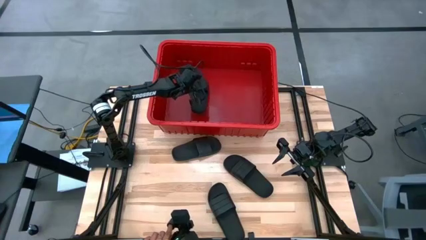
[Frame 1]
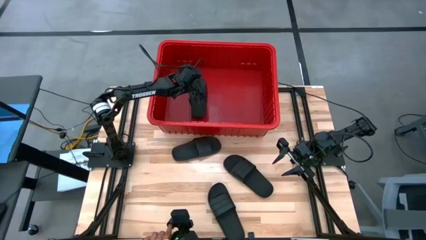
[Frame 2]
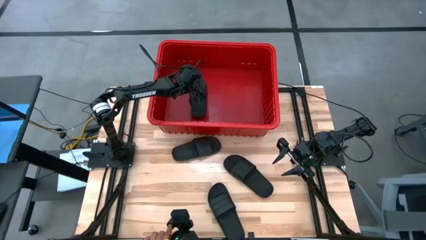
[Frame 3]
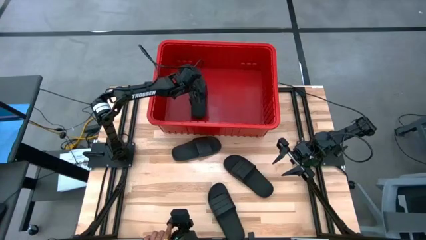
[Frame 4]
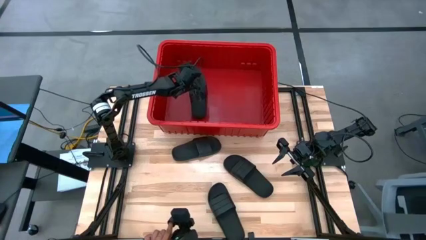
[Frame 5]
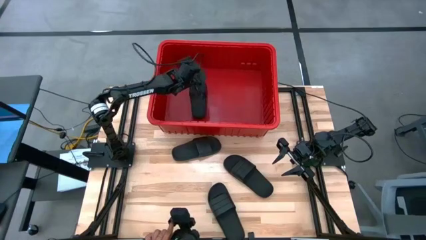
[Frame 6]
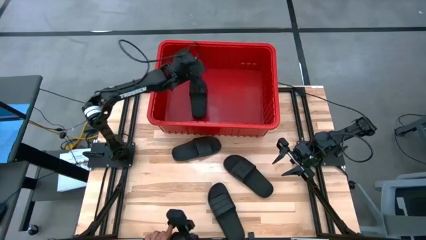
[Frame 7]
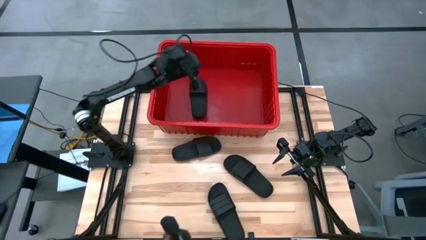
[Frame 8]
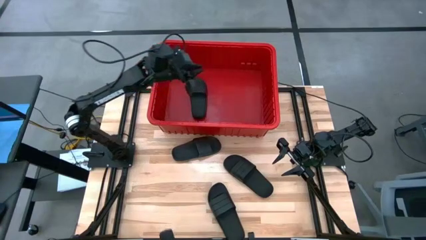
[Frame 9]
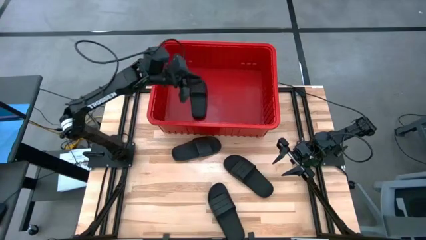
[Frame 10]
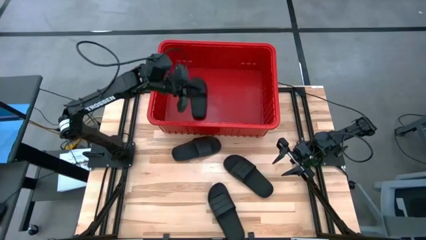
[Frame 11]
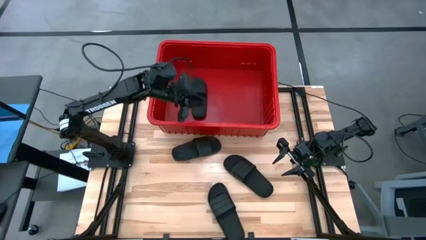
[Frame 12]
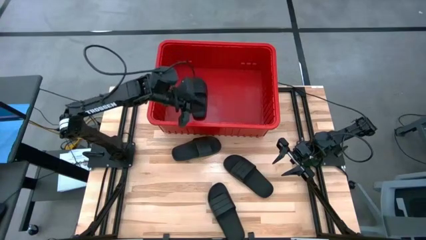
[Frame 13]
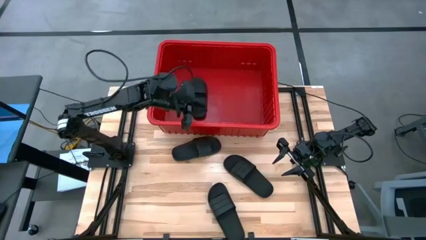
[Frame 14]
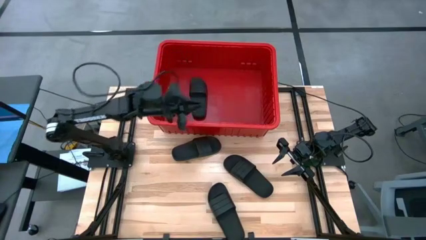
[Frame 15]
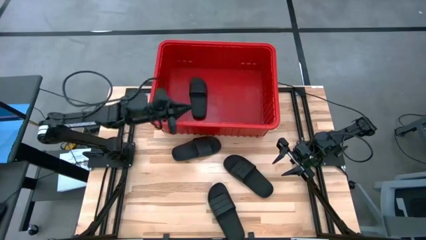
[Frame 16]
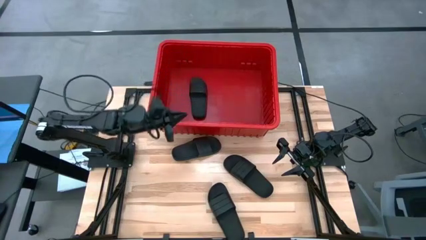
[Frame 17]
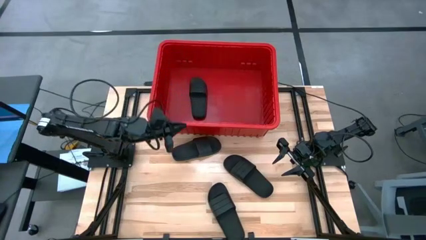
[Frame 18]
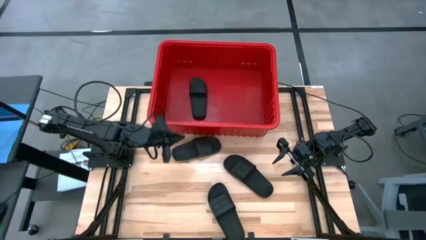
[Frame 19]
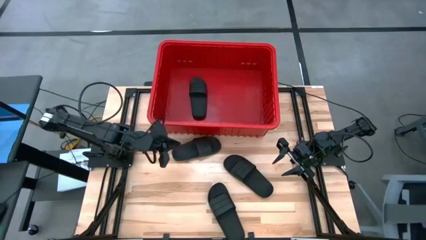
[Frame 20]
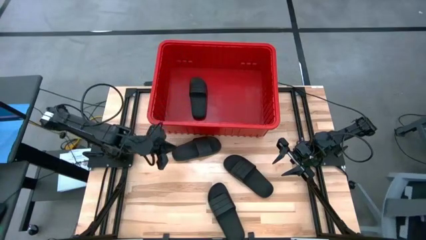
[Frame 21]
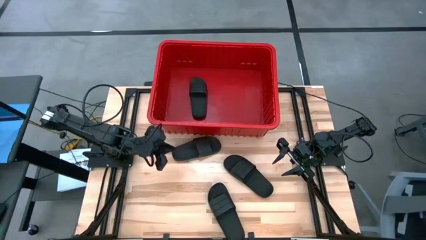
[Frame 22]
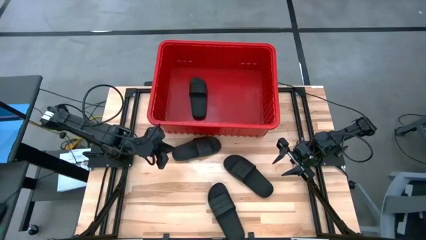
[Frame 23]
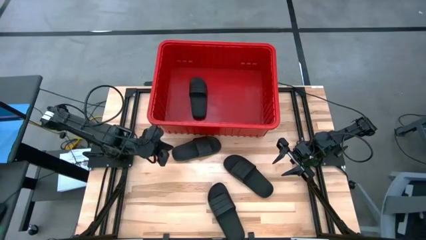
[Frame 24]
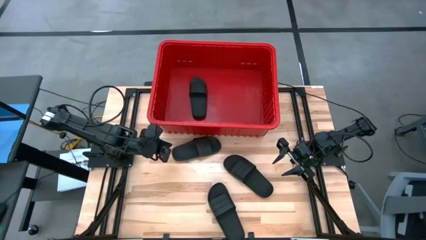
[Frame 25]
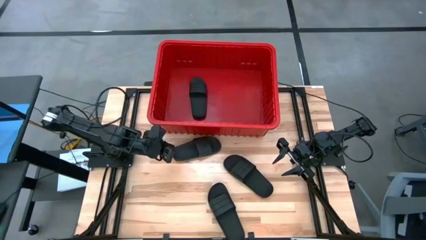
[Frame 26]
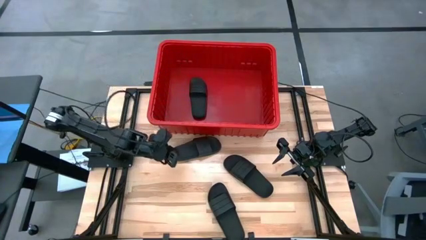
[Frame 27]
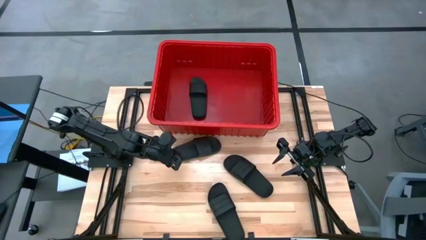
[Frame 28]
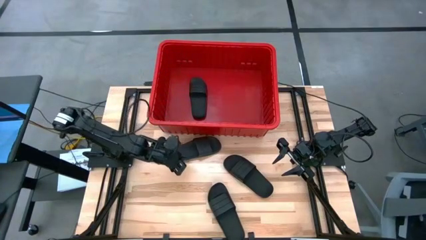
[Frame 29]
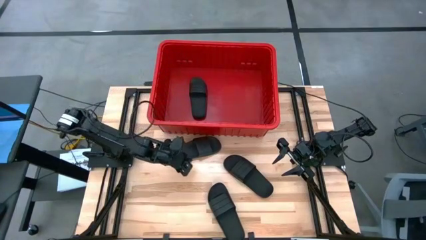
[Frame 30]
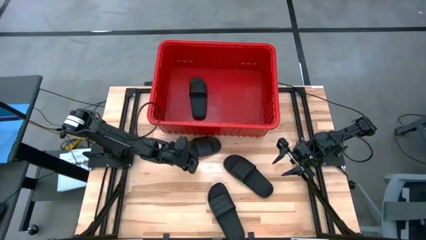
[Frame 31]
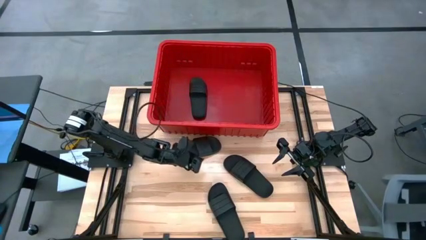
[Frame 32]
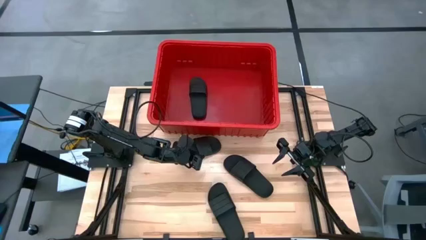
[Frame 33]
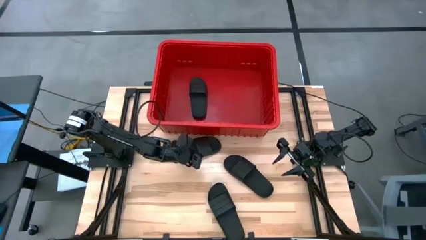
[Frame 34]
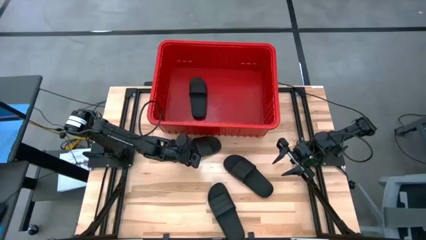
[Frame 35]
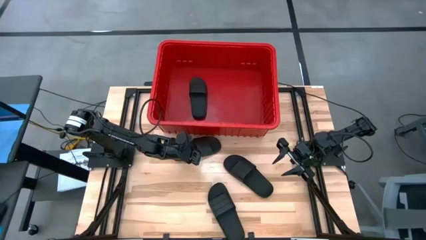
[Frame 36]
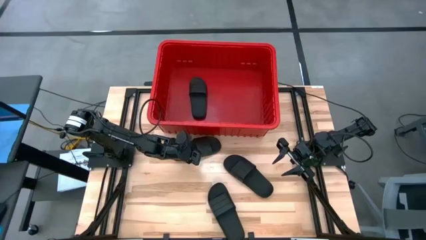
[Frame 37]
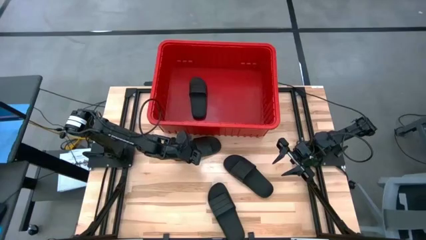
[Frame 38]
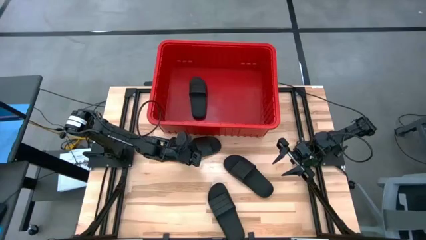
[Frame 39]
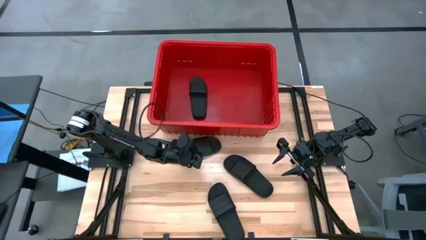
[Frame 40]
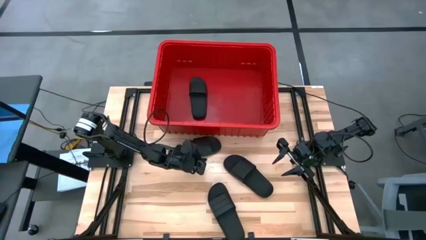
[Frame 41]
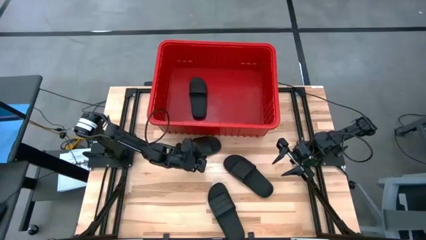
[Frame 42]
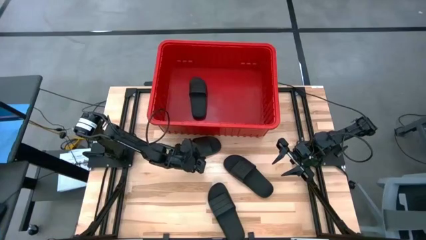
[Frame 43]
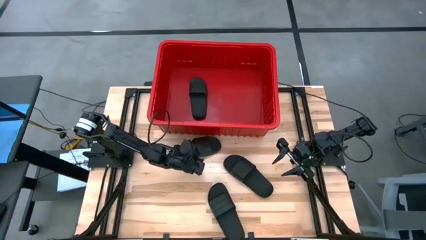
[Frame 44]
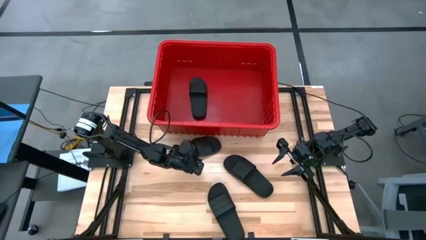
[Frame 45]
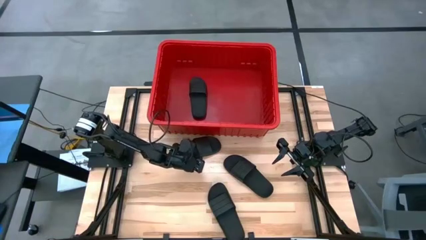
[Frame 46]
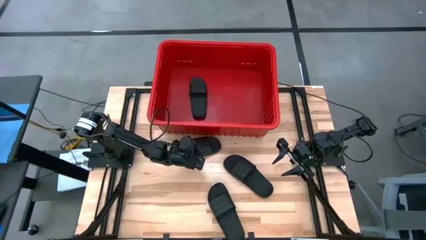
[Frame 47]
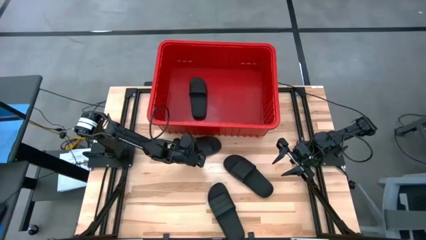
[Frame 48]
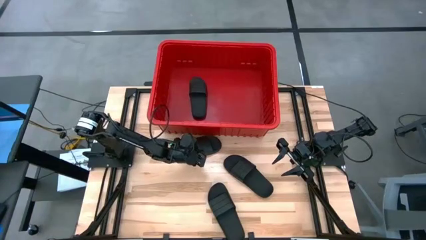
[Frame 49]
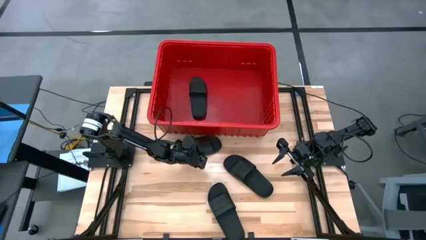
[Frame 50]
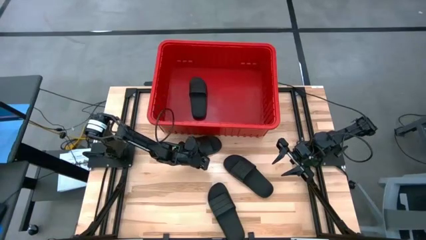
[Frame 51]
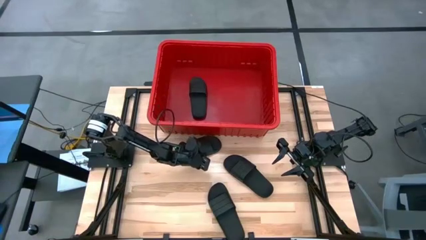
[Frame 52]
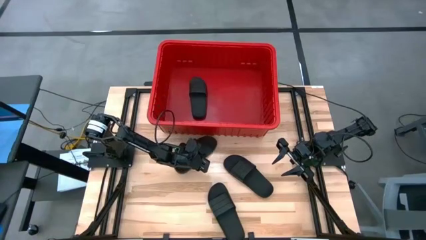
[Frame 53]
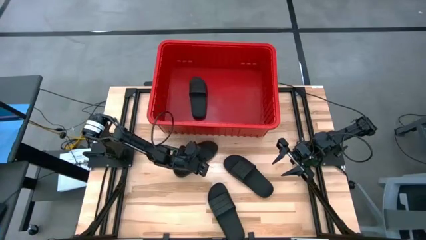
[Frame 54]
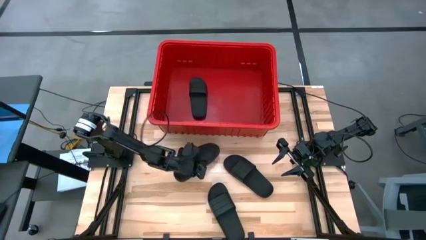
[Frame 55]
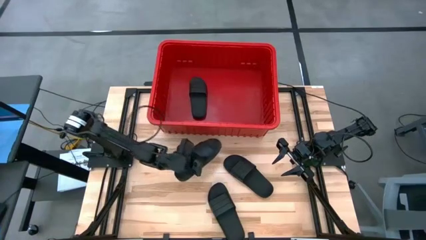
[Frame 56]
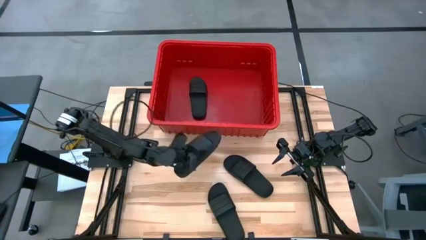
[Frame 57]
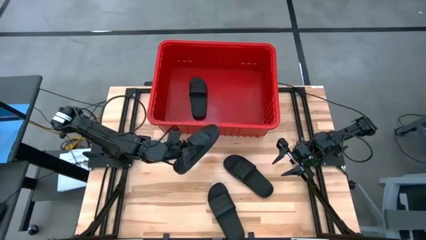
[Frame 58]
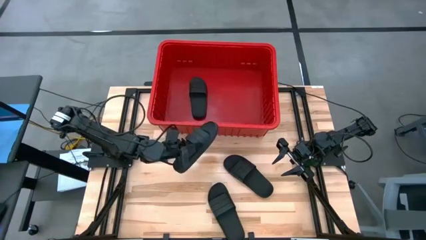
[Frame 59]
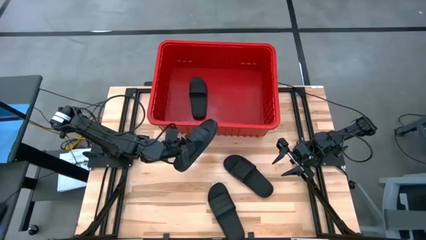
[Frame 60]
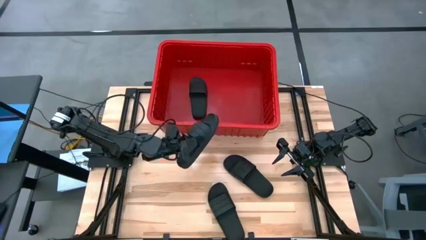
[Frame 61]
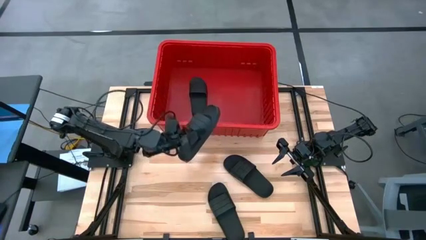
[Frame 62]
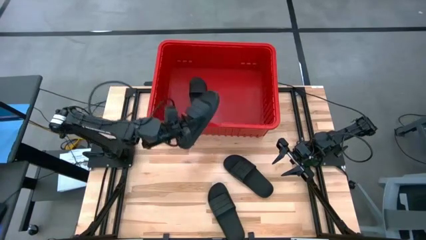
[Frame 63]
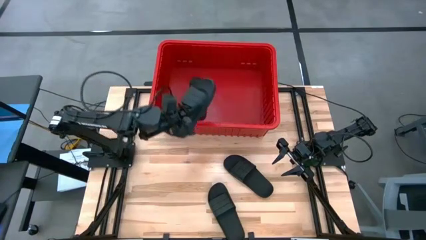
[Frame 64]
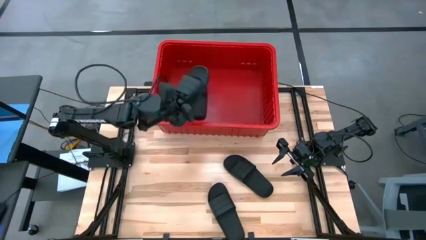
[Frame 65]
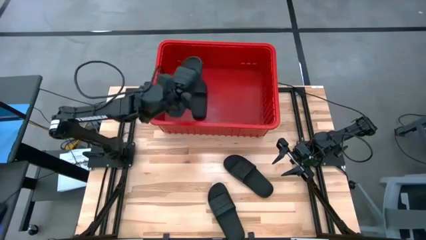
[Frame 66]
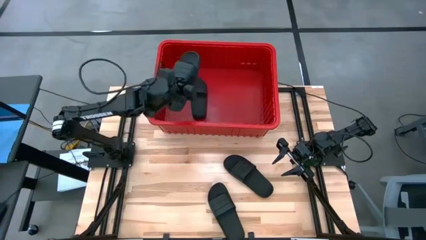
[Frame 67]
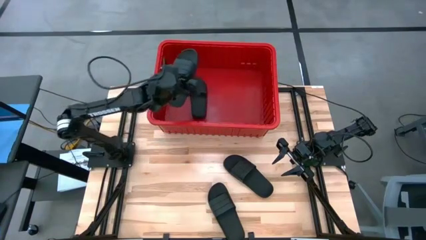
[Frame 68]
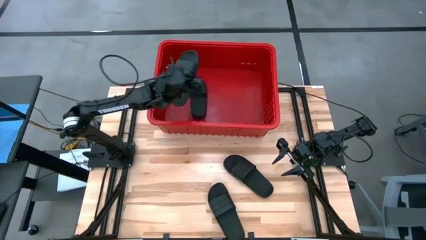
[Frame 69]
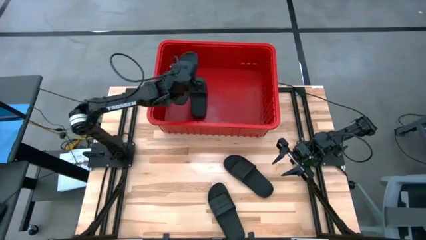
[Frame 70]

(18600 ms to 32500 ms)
Task: Pick and place slides into bin
Put the top slipper into the organizer bin
